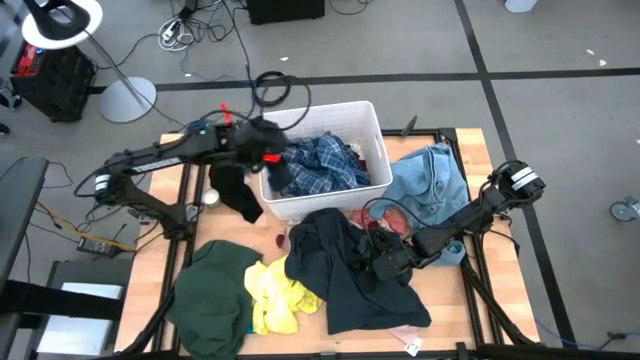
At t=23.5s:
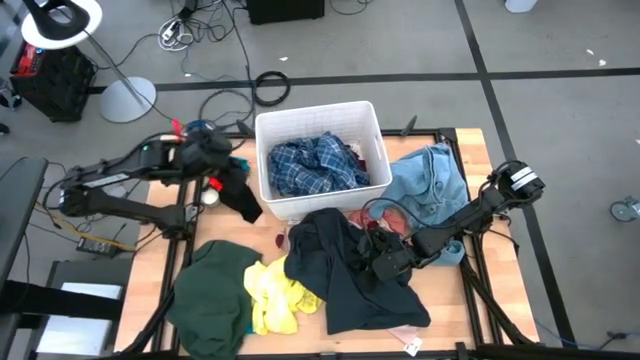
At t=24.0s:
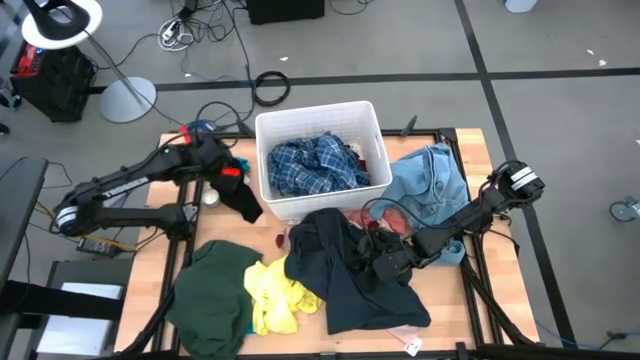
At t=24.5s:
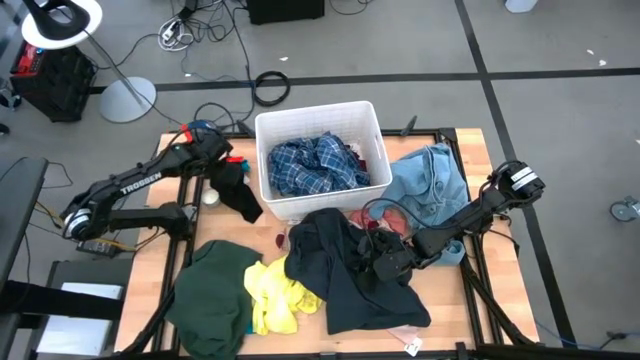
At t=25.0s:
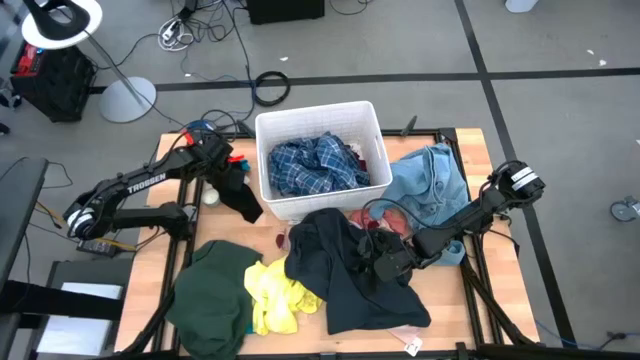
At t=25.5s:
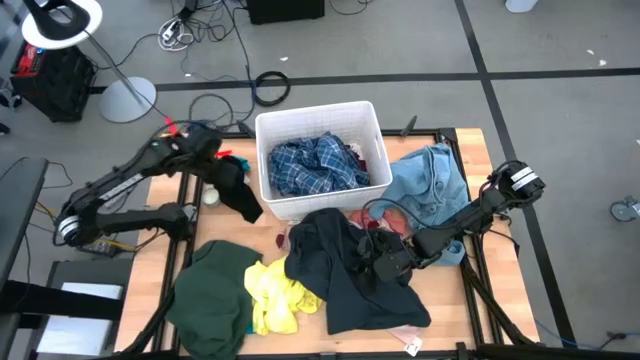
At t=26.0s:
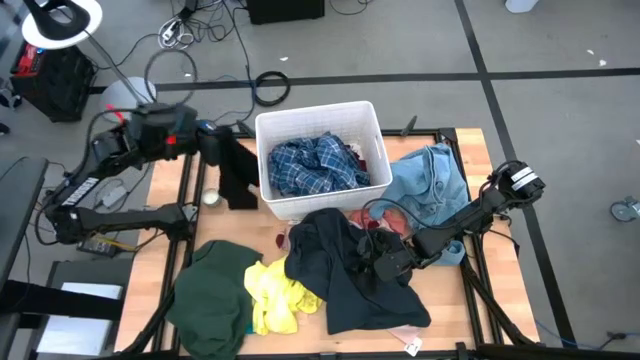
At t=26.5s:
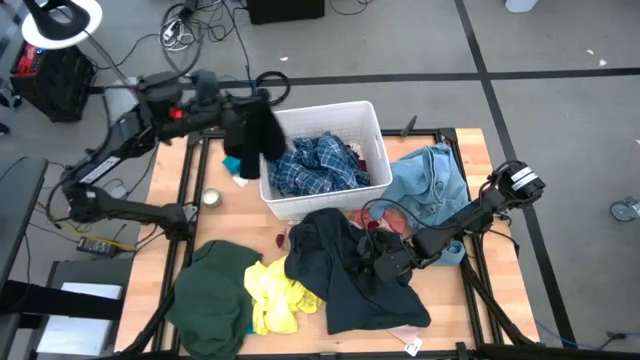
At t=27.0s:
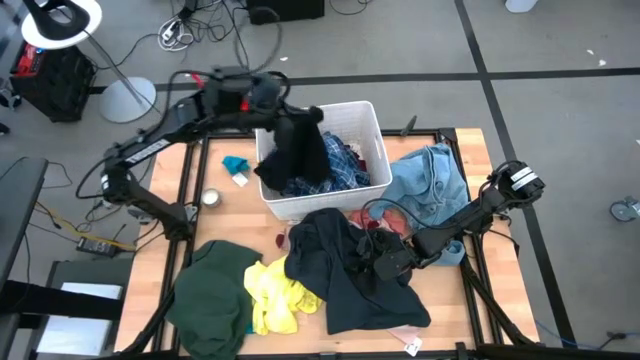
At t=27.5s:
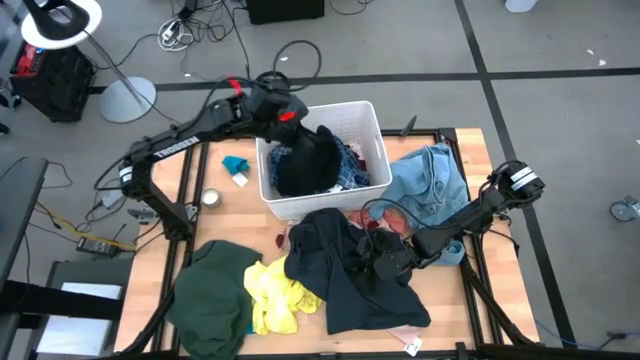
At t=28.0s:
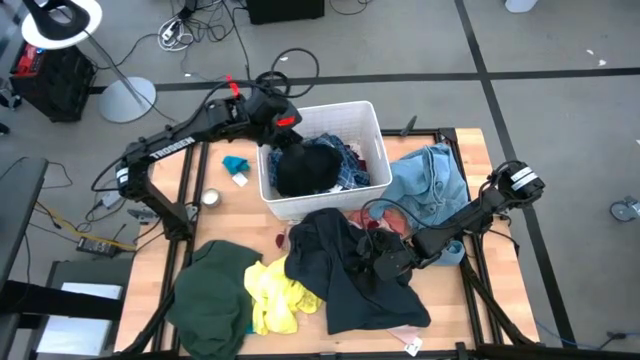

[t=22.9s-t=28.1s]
Task: Sort clothes
Put the black shirt into the white bin

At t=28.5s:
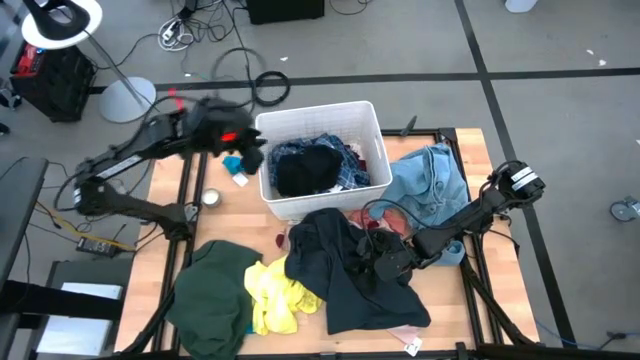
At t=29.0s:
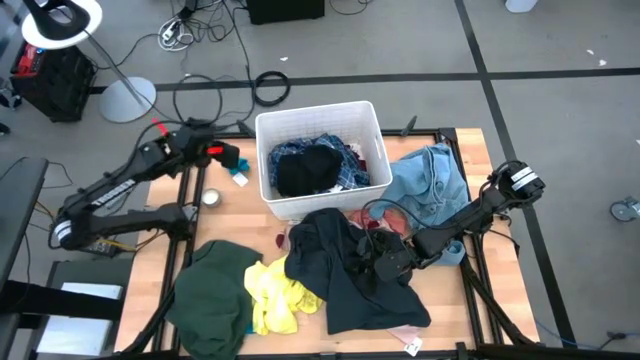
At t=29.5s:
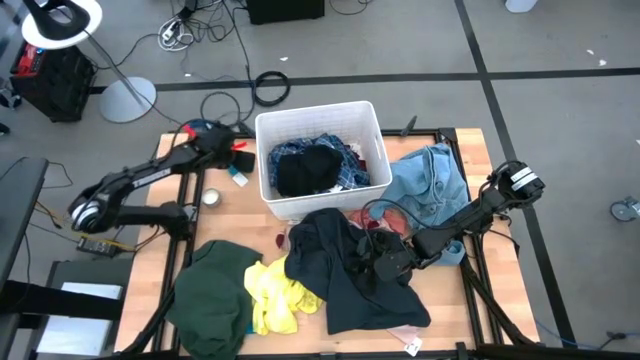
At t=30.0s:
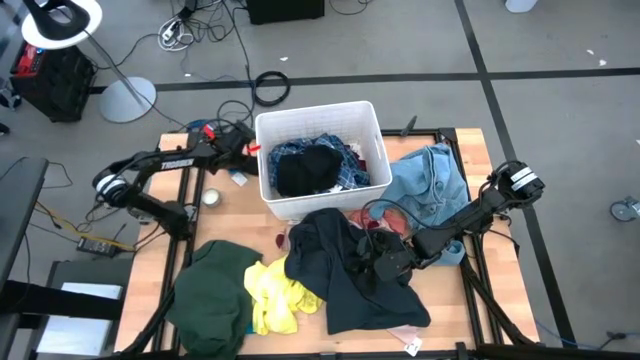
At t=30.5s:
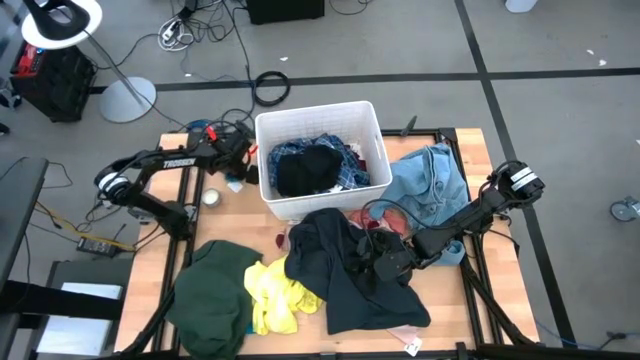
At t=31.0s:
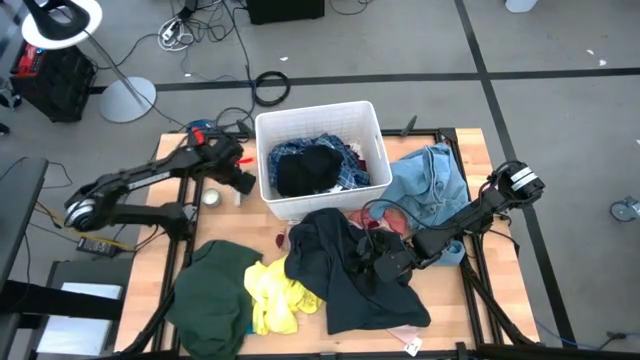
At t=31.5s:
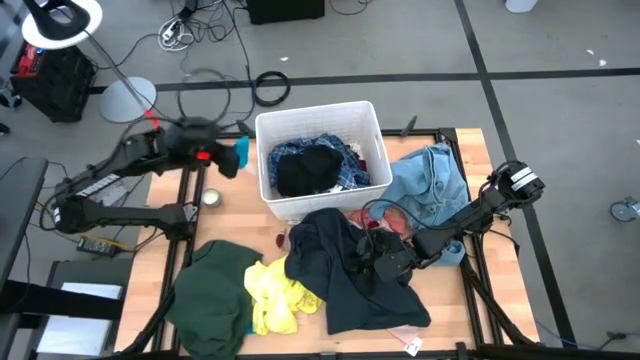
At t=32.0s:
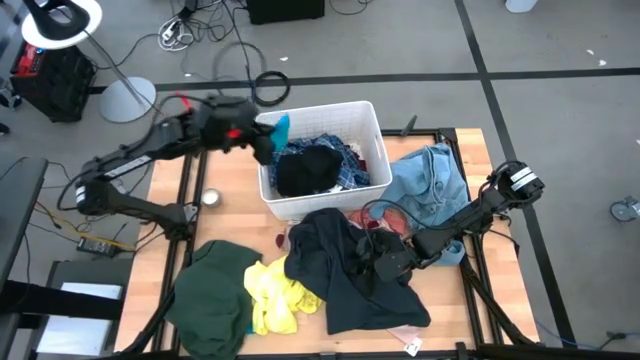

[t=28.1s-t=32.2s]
Put the blue sock into the white bin

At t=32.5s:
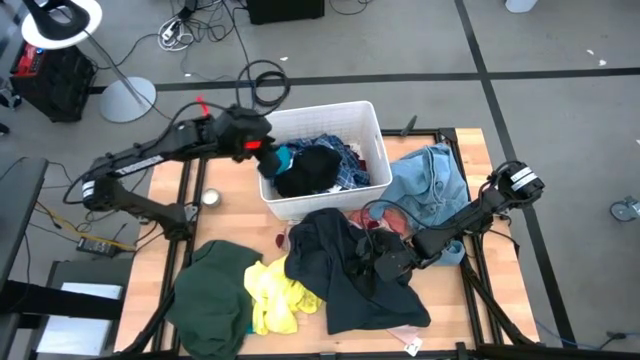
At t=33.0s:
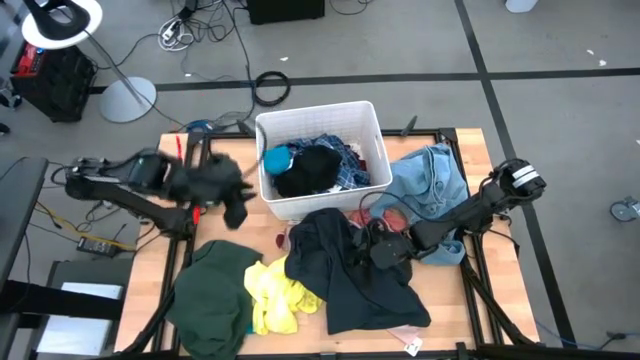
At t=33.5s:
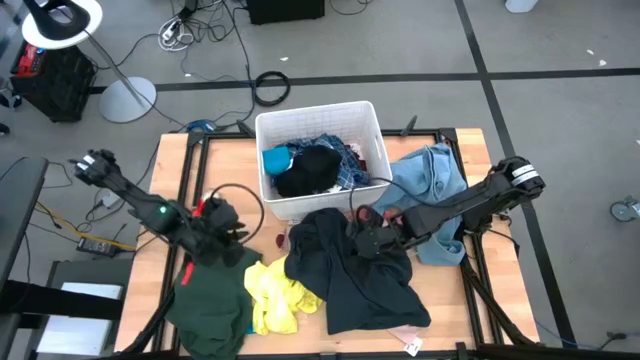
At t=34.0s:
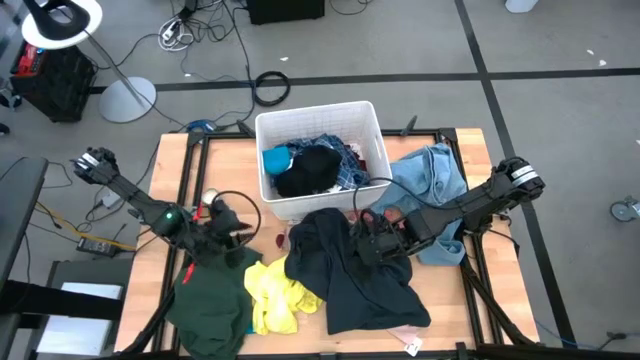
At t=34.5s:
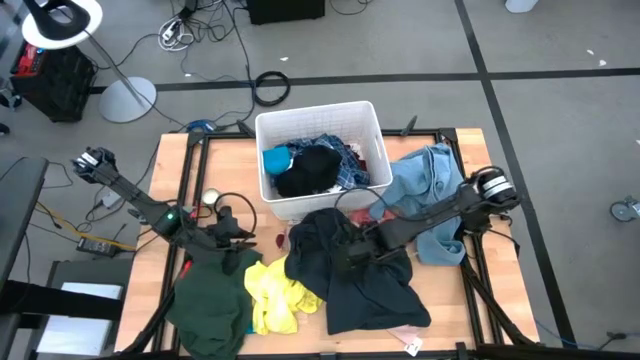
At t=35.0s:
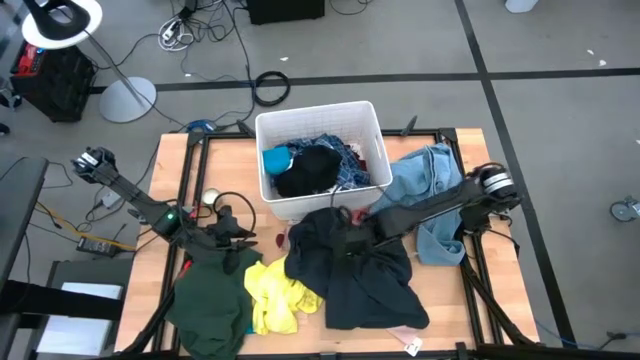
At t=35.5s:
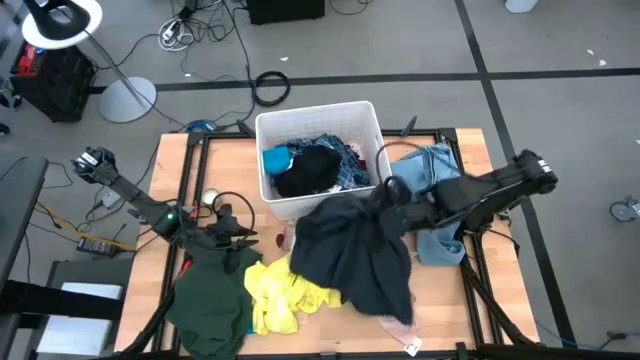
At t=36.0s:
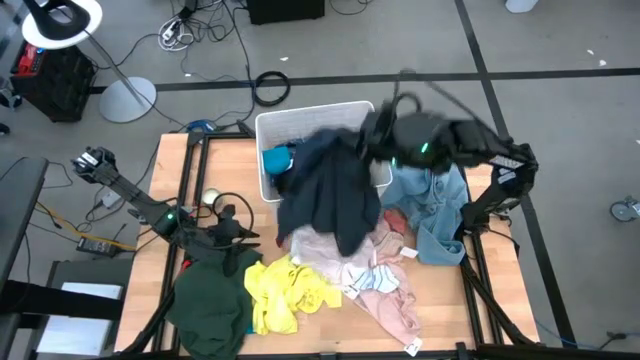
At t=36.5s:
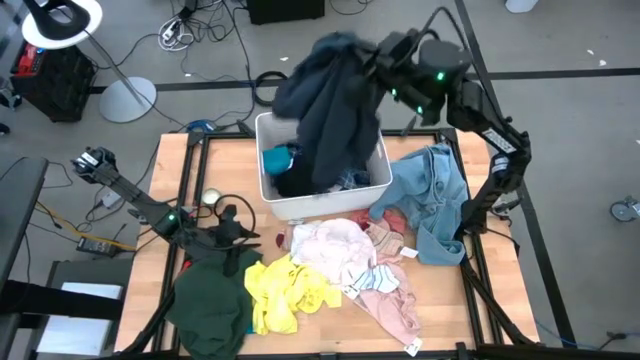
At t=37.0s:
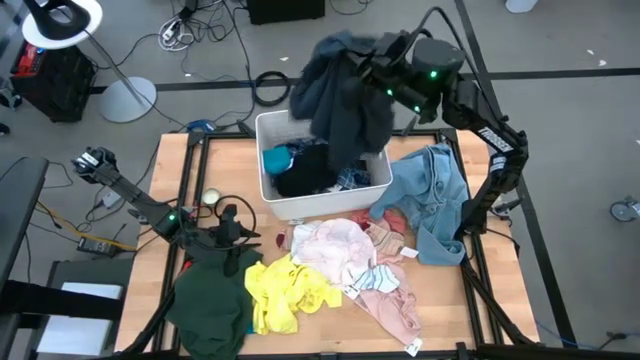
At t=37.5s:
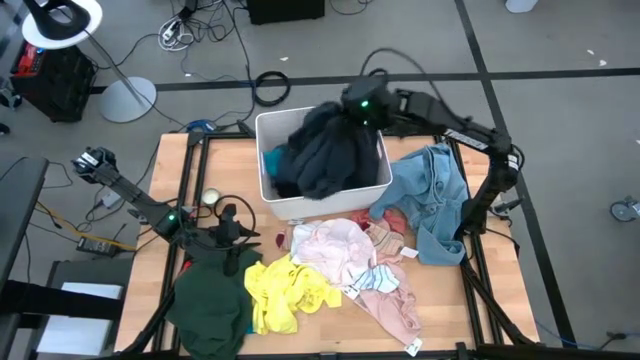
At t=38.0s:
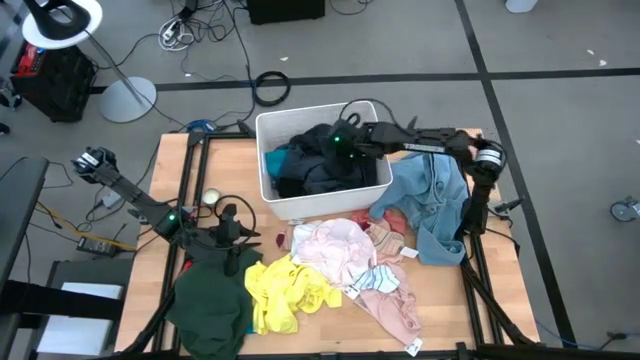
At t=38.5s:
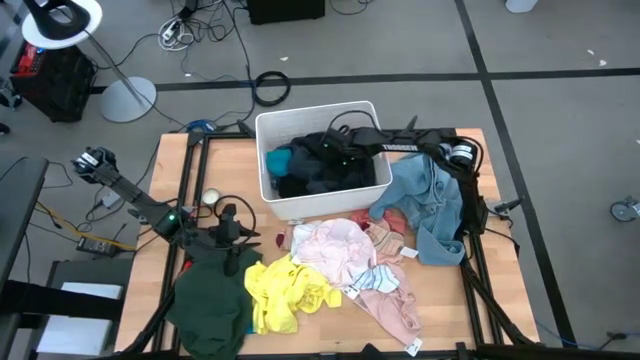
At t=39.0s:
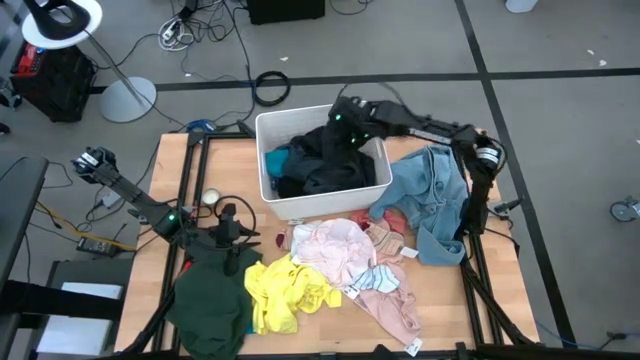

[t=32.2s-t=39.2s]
Put the dark blue shirt into the white bin

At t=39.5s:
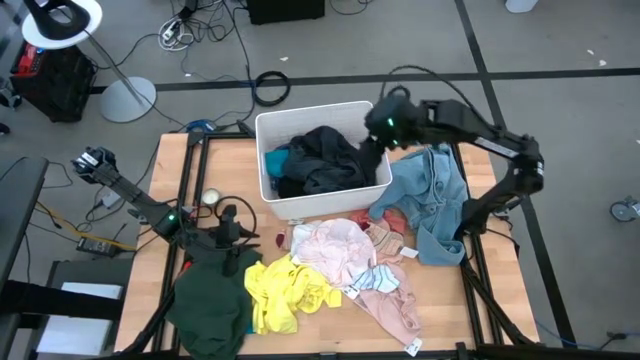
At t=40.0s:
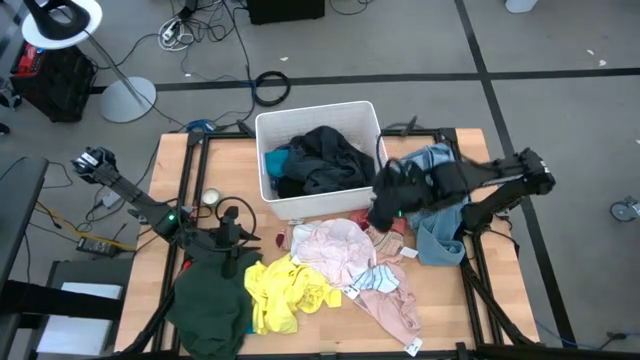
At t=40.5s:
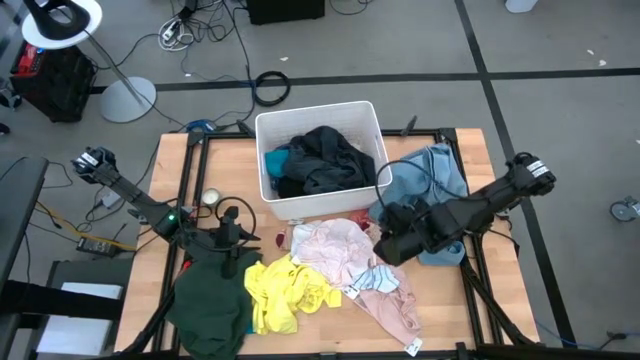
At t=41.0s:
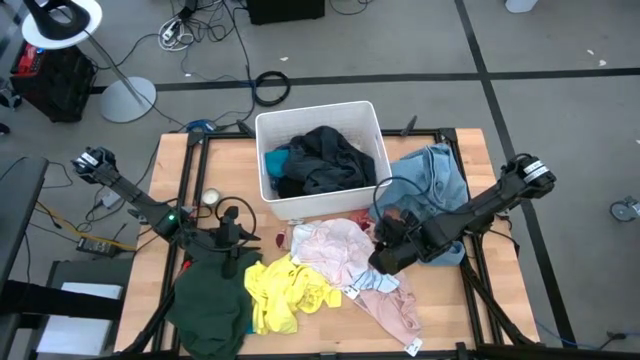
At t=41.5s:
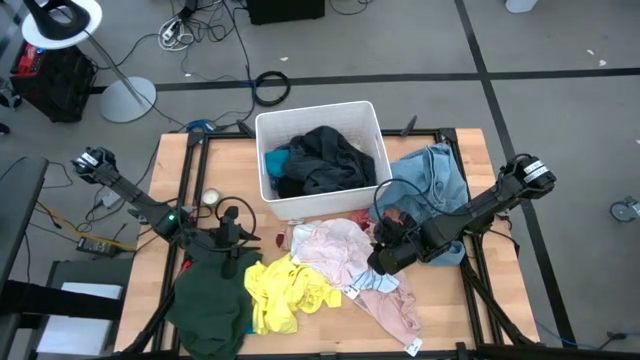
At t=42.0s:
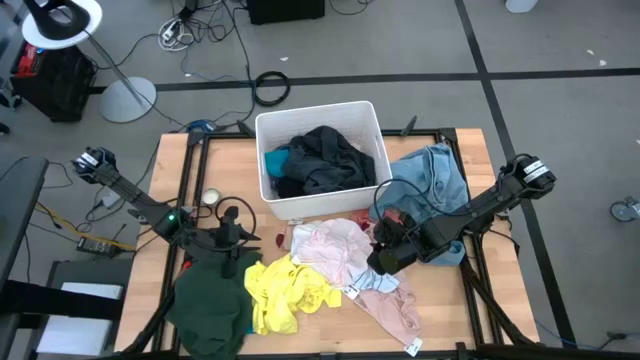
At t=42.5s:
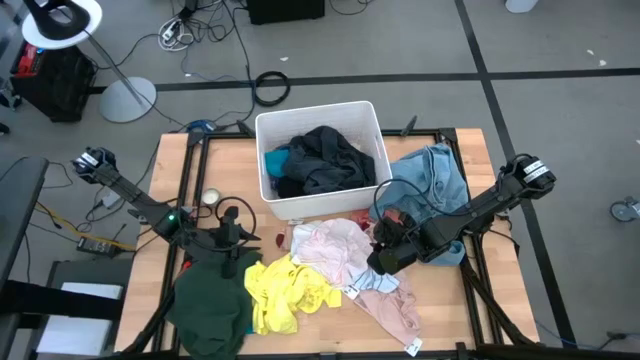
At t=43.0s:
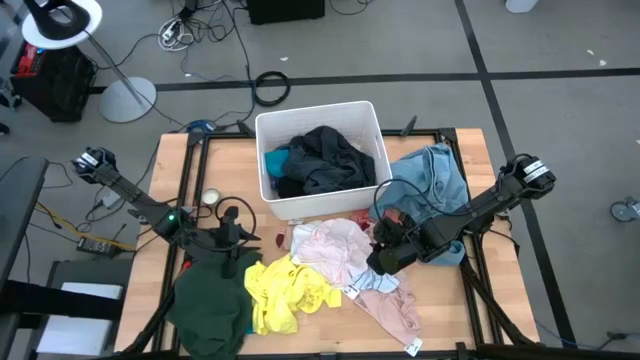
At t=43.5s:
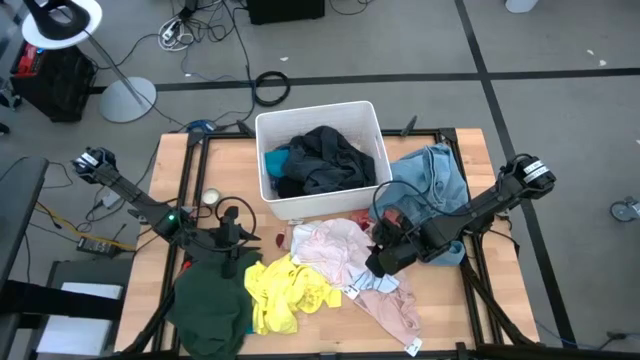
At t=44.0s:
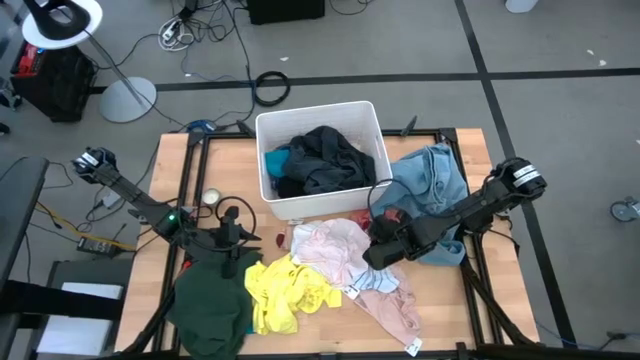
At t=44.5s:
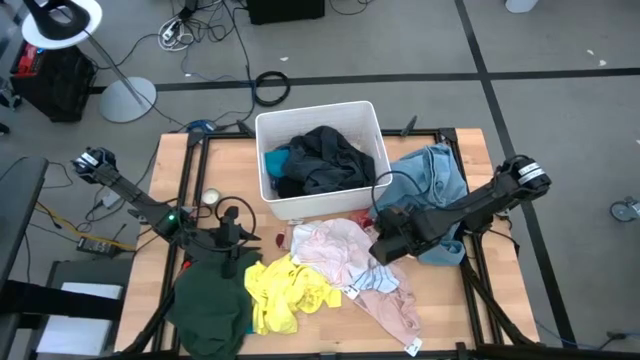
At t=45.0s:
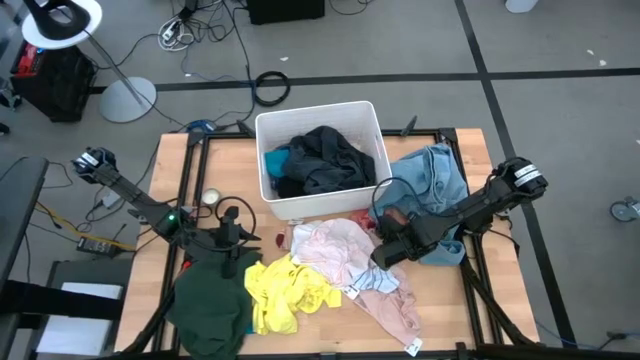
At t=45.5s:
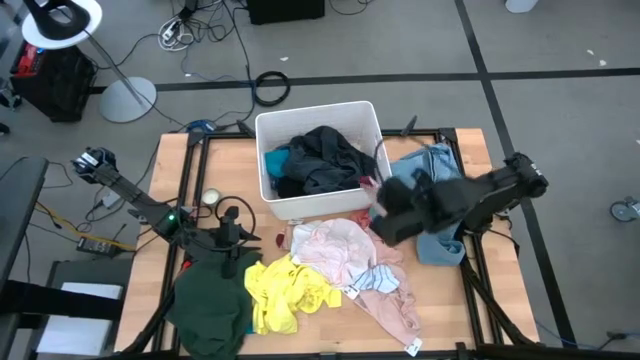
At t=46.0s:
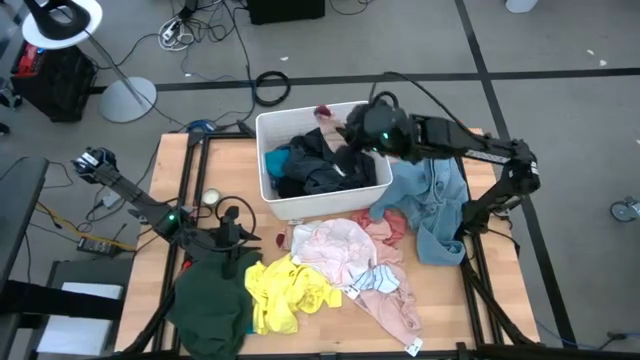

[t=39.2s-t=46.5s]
Put the right pink striped sock into the white bin
